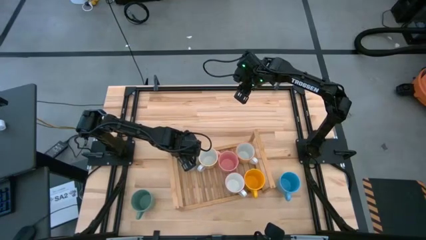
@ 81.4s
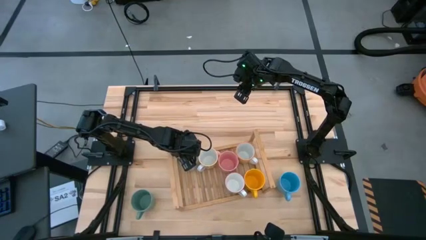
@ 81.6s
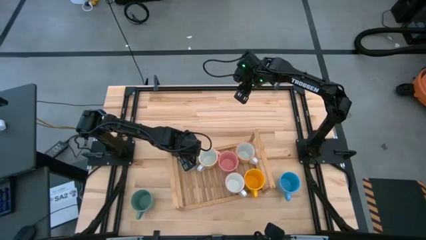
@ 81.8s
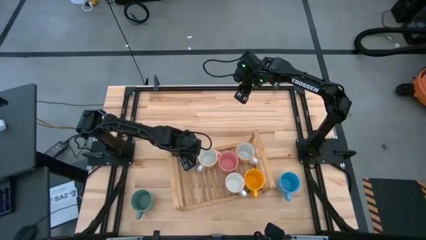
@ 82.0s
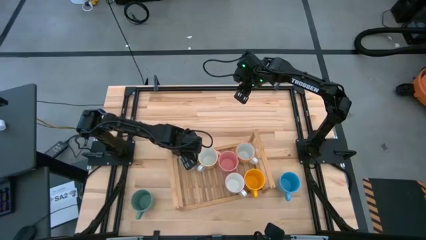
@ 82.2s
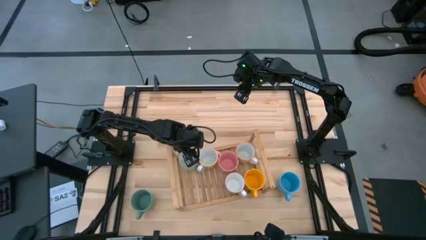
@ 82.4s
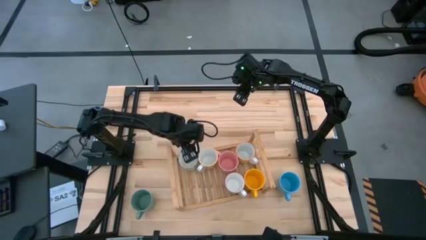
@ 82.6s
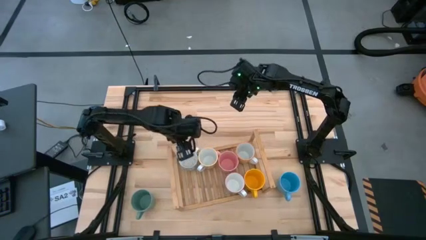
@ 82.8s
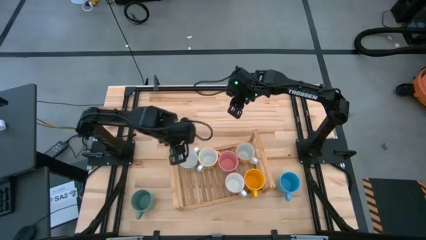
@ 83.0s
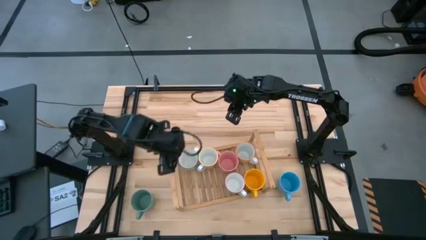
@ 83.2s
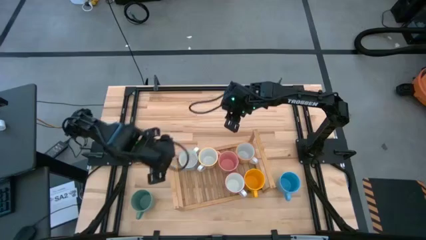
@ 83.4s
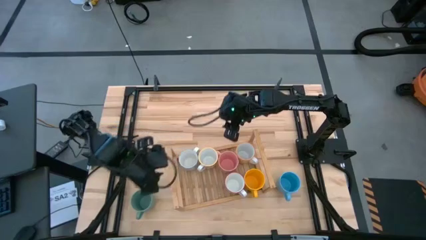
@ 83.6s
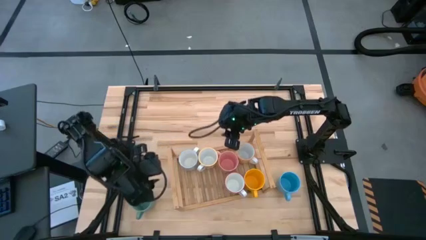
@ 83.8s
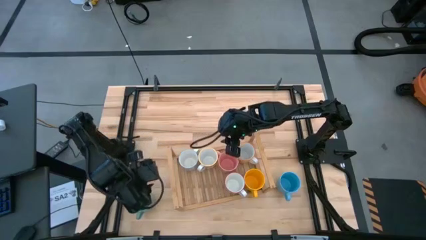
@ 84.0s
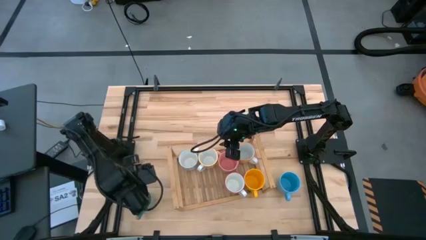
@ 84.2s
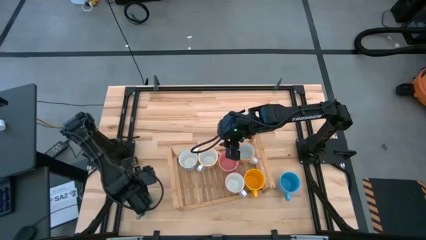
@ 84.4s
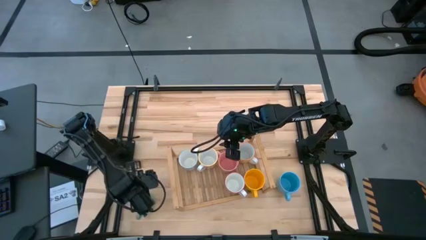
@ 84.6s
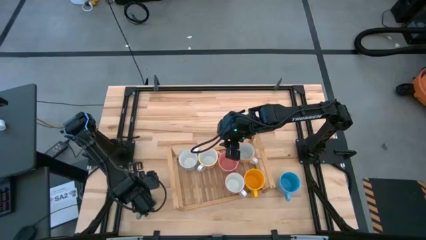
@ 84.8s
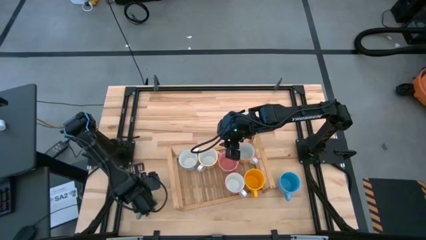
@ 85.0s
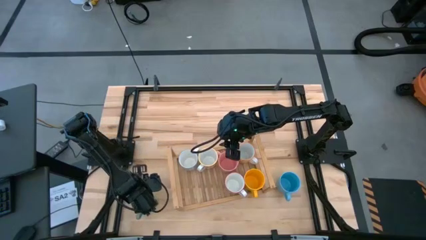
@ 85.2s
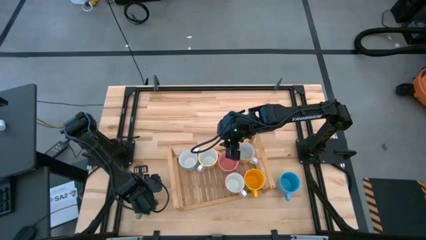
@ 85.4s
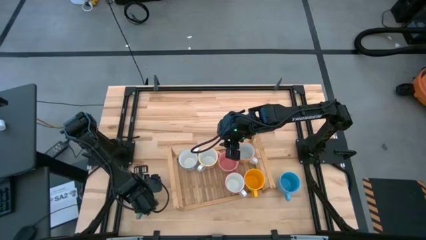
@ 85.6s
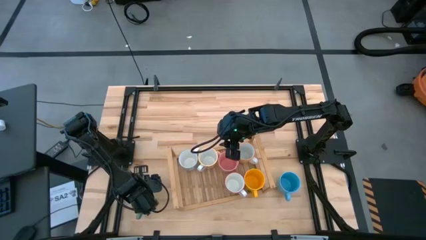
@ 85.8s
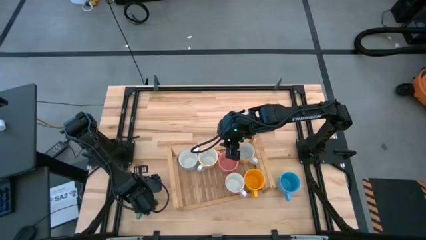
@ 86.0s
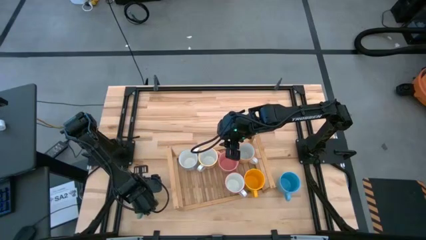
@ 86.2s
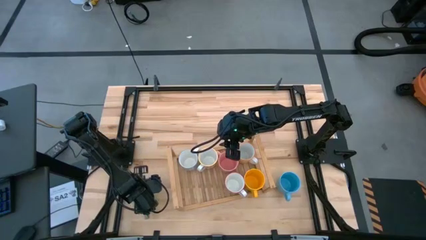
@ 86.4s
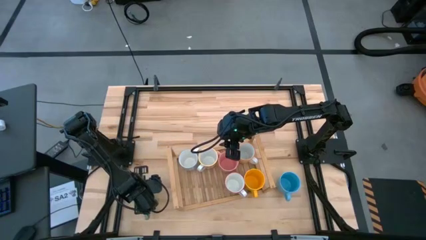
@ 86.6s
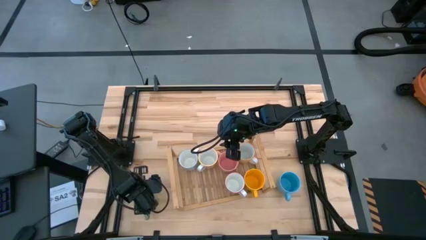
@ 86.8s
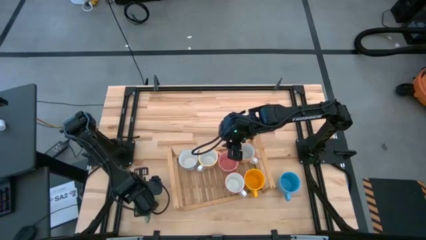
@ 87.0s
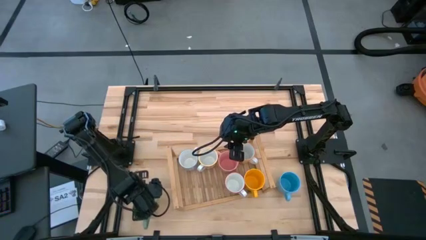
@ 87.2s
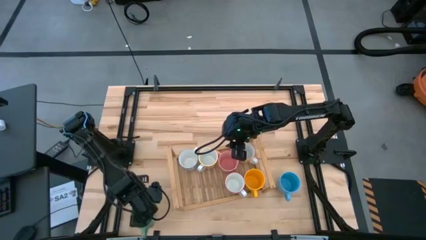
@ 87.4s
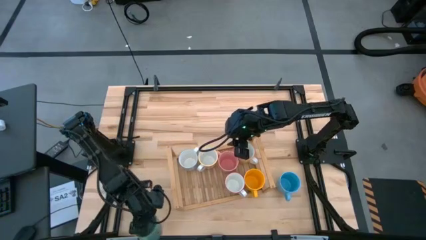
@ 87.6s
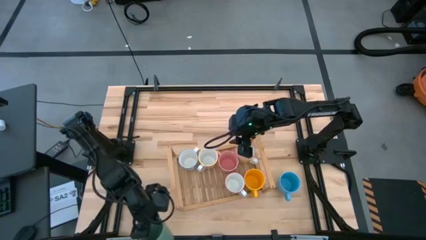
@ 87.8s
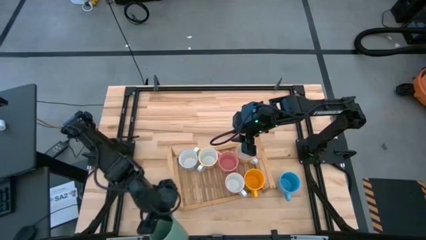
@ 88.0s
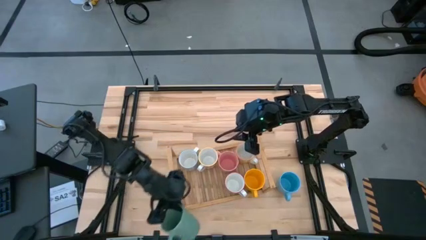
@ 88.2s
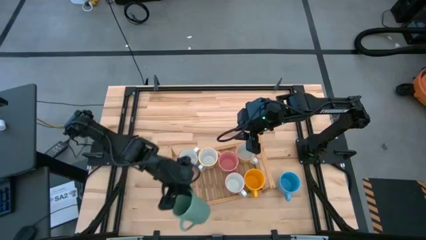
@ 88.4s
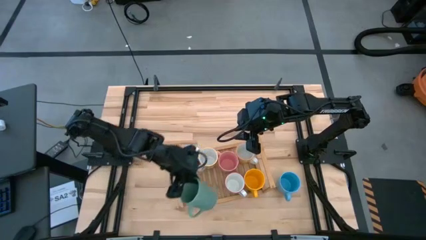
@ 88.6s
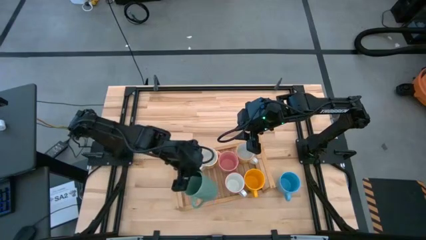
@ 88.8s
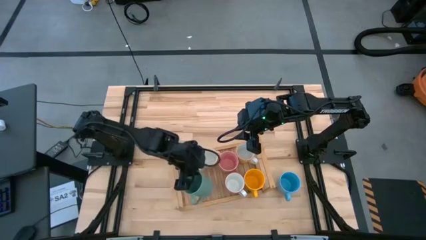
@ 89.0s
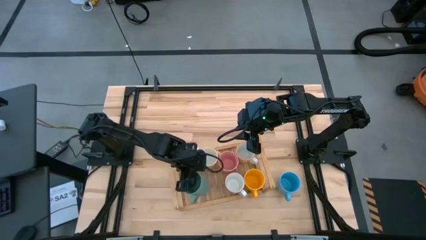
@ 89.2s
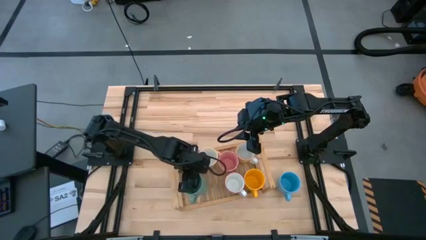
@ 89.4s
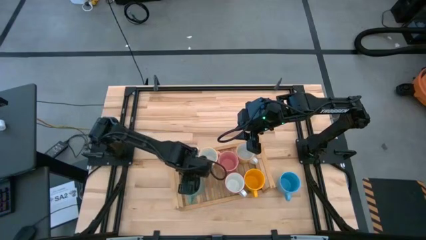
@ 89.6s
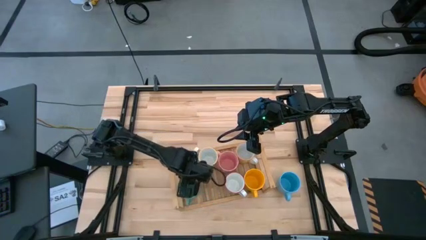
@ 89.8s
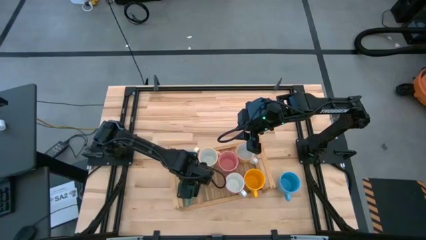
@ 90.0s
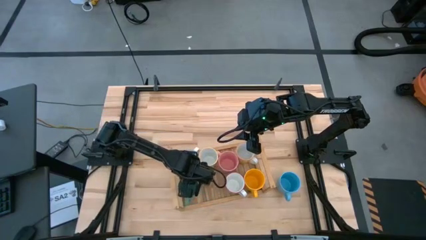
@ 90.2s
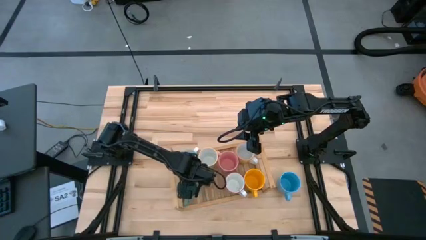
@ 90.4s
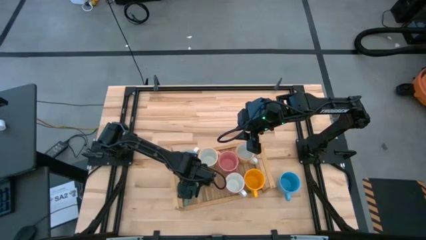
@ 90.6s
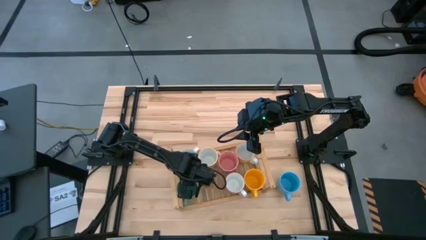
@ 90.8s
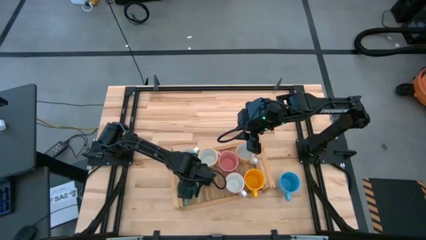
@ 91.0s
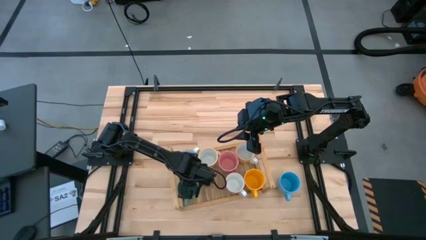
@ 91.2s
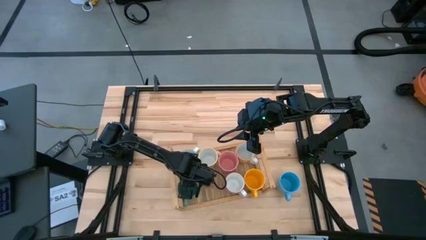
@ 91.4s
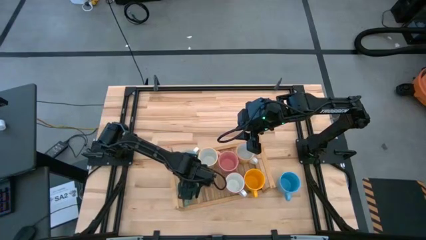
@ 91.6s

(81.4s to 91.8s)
Task: Place coffee mugs
Put the green mug on the shelf

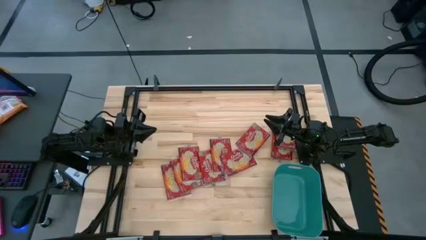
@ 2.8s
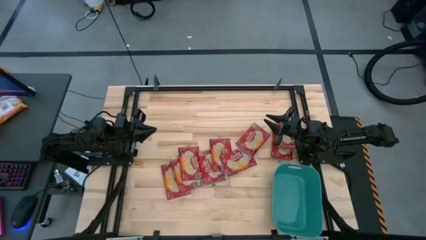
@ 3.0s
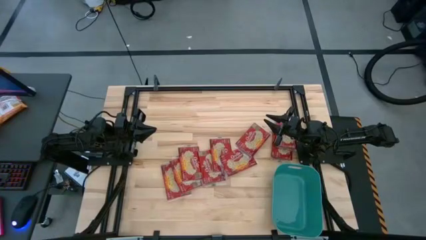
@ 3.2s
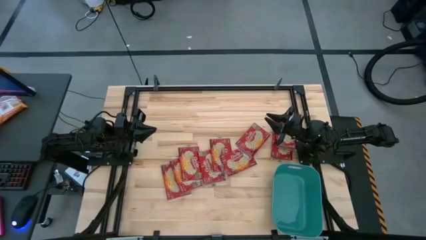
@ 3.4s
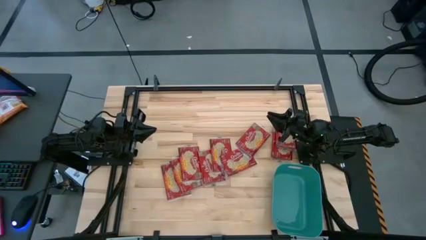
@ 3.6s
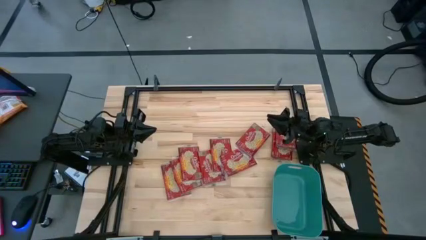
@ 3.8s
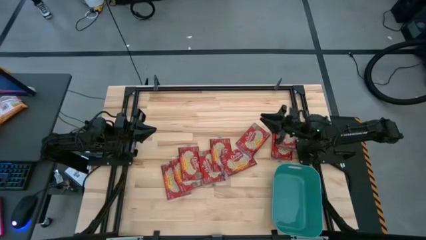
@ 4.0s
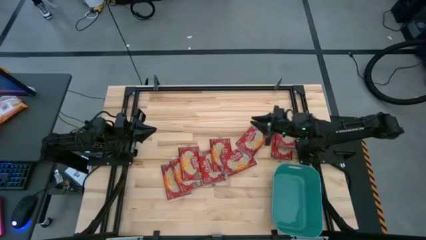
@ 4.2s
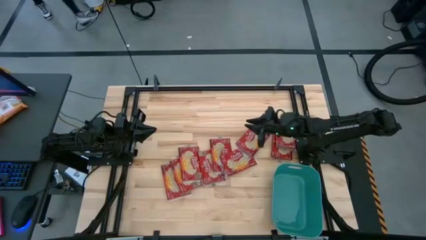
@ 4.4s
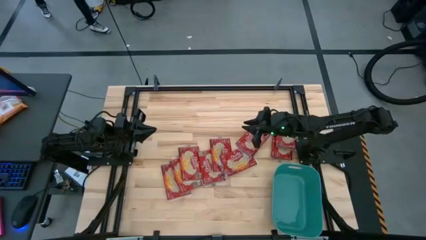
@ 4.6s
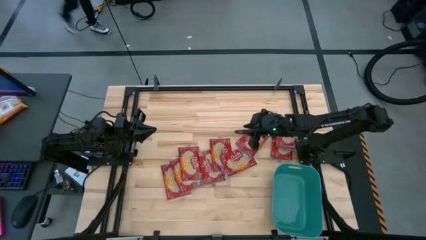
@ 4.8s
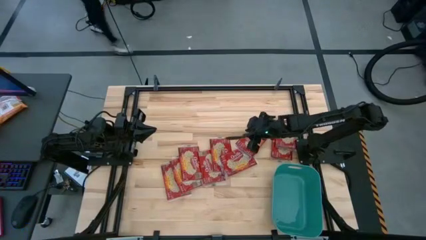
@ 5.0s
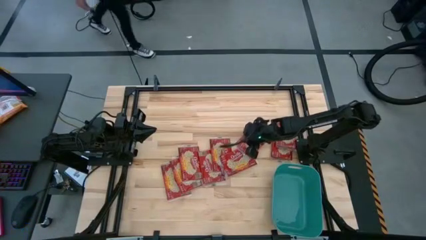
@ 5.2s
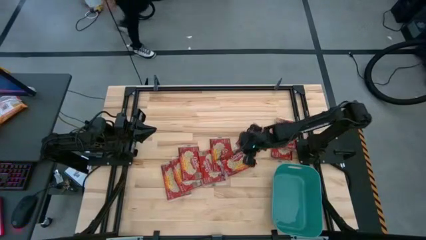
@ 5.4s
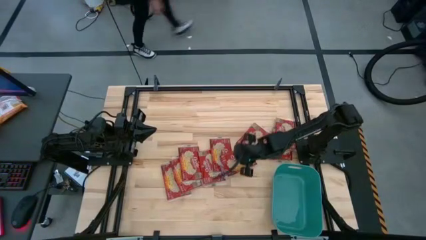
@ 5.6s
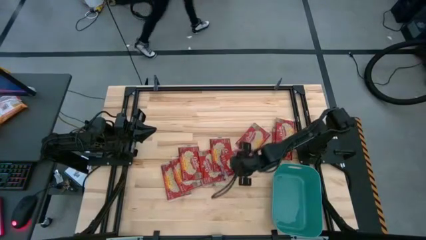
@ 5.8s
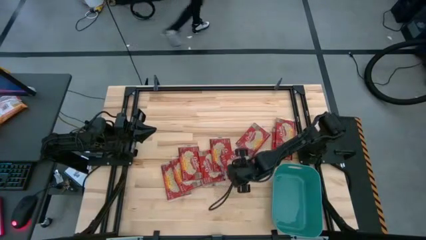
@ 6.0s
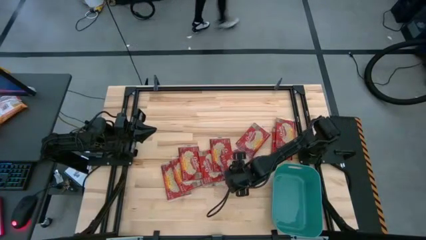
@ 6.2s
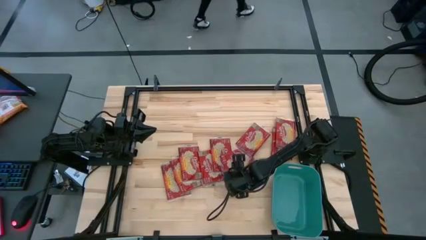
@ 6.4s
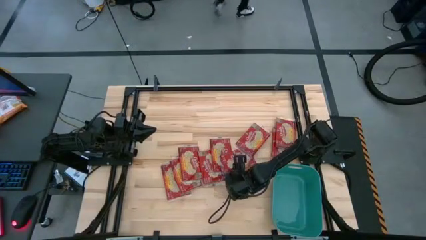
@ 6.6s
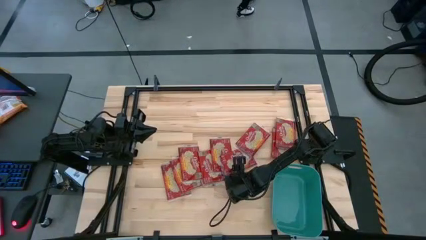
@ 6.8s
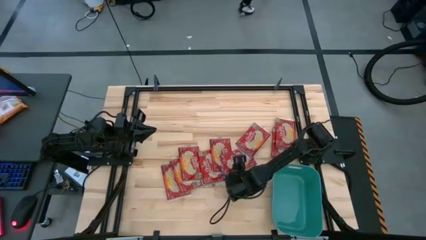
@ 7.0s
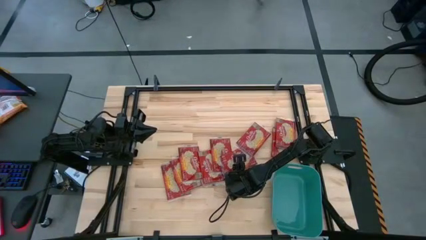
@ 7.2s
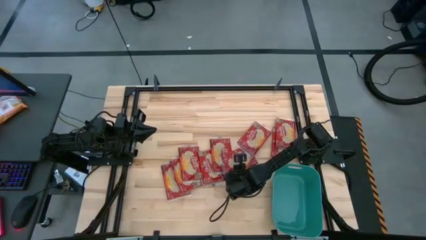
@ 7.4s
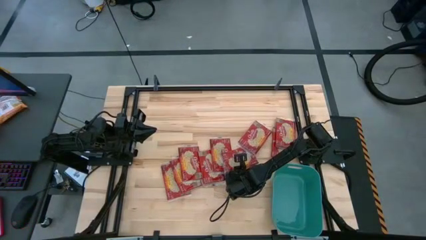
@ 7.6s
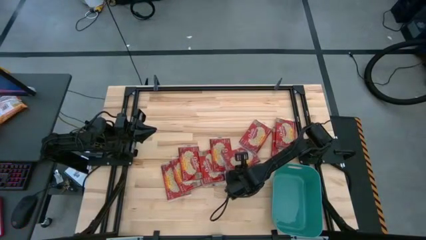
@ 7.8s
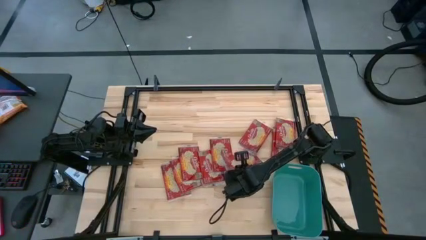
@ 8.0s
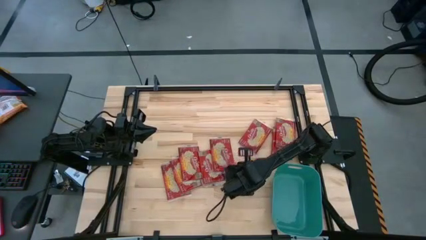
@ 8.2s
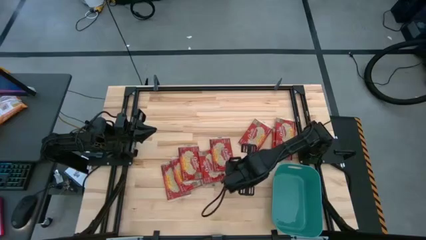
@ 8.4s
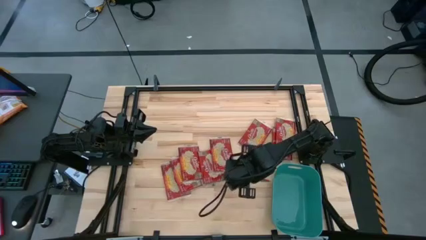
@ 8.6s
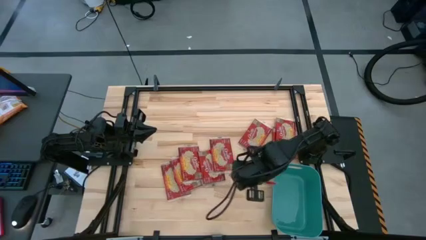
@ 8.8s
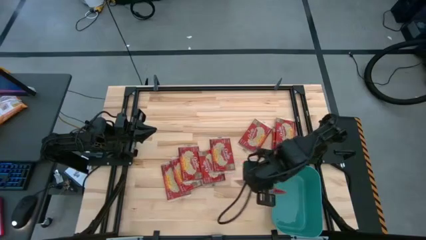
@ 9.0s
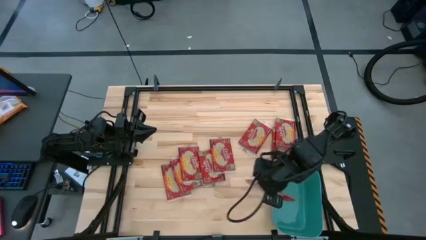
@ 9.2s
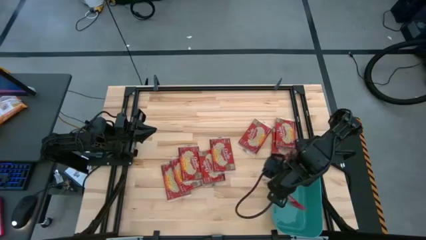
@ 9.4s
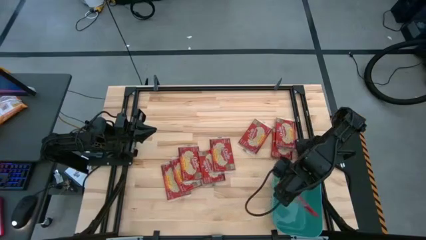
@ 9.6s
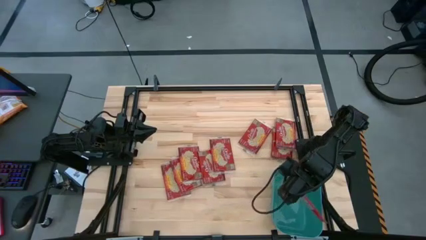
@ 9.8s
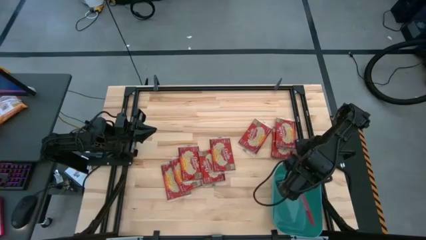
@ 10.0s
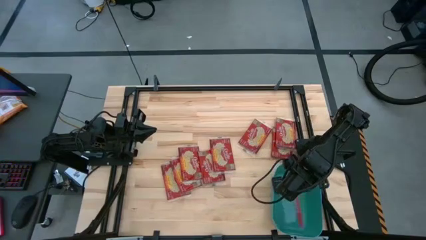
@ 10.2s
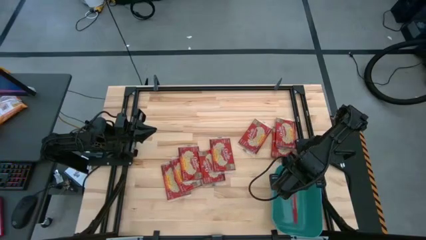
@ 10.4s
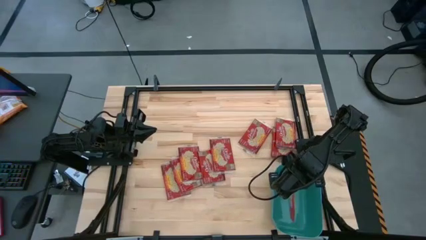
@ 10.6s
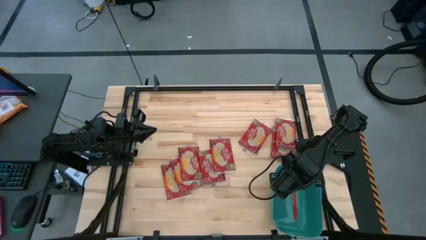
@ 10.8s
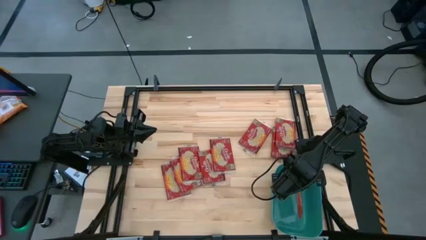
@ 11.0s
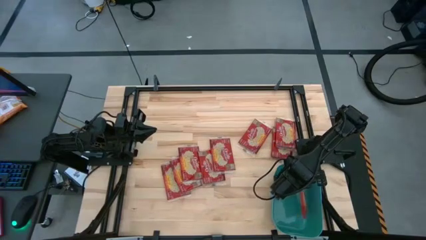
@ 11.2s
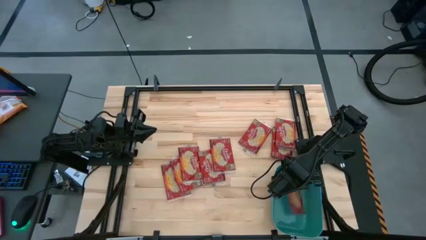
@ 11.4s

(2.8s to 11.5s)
Task: Sort popcorn bags into baskets
Put the red popcorn into the green bin
